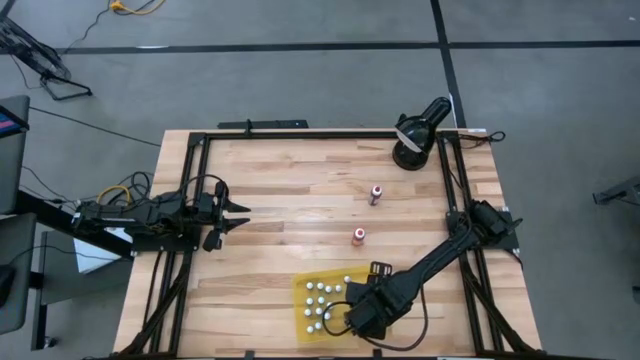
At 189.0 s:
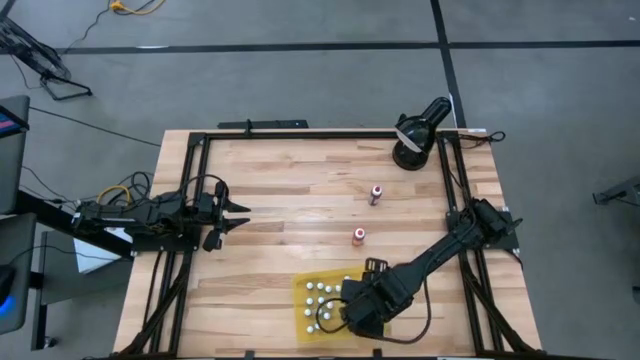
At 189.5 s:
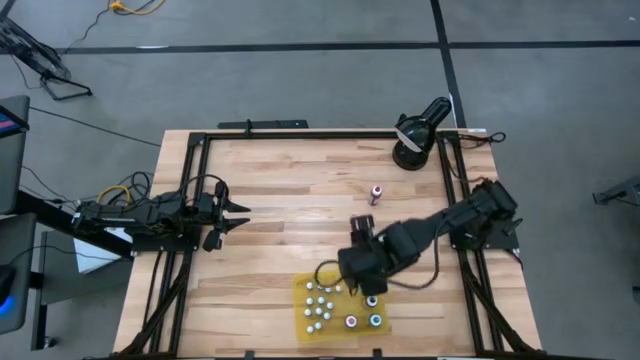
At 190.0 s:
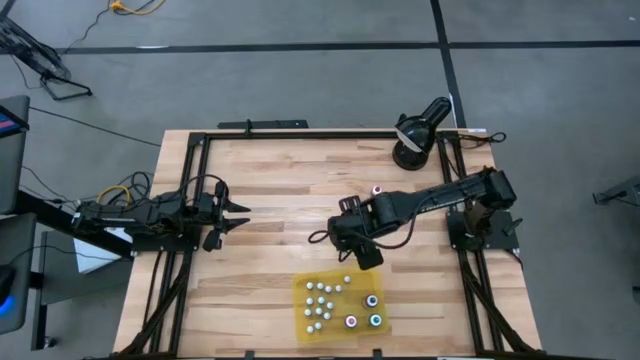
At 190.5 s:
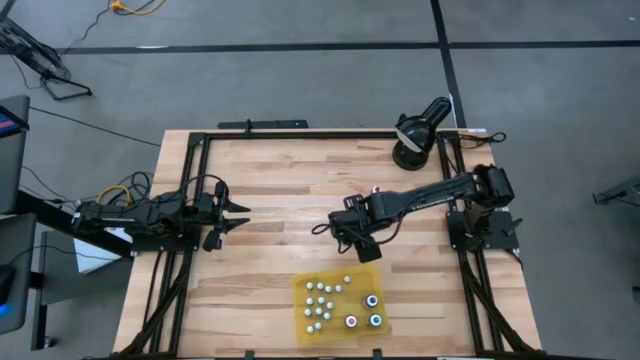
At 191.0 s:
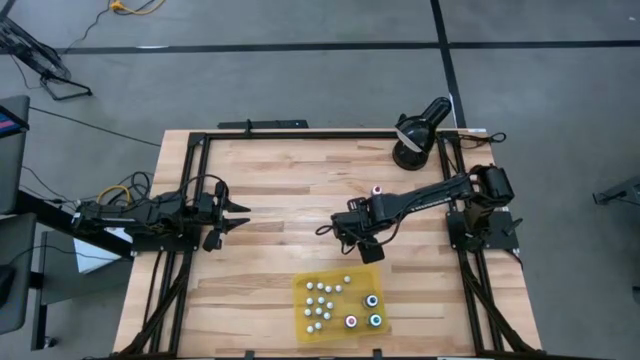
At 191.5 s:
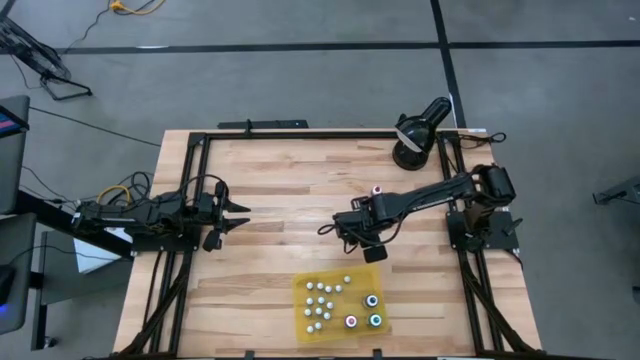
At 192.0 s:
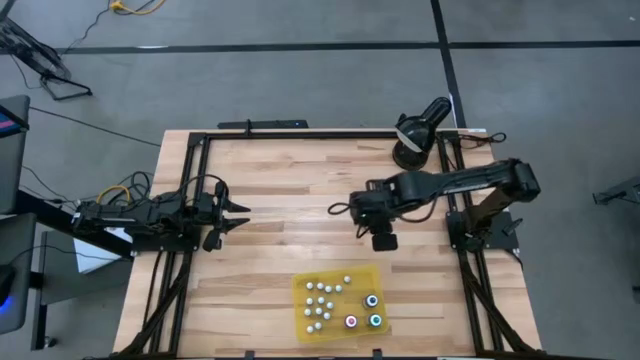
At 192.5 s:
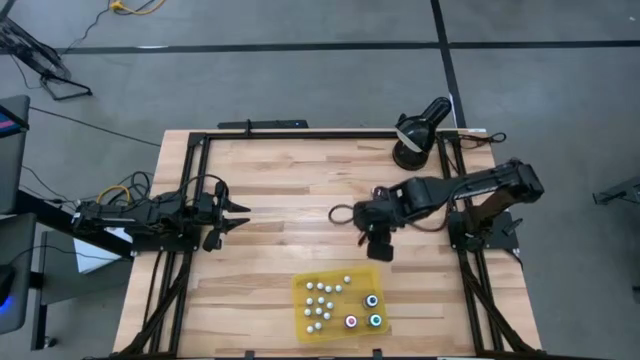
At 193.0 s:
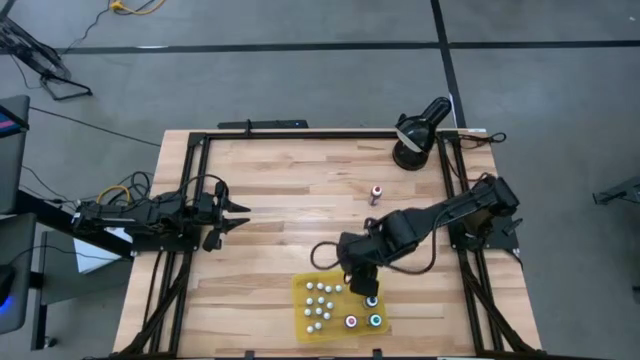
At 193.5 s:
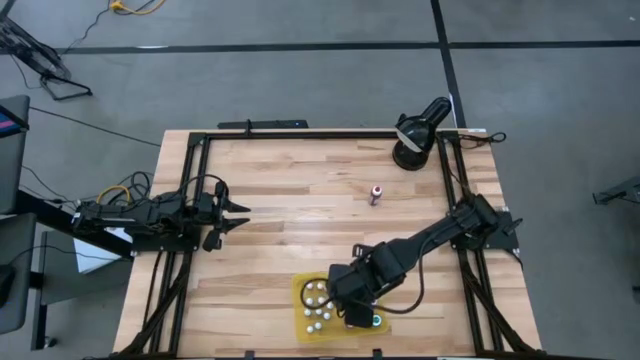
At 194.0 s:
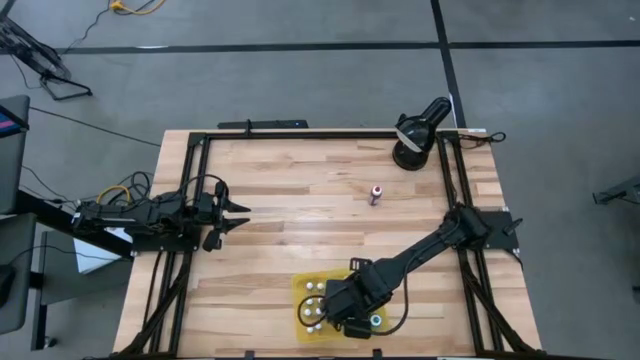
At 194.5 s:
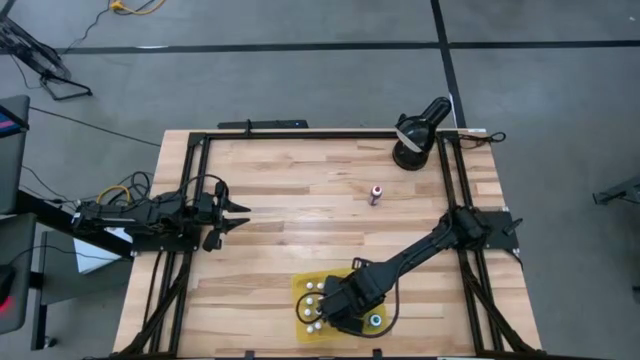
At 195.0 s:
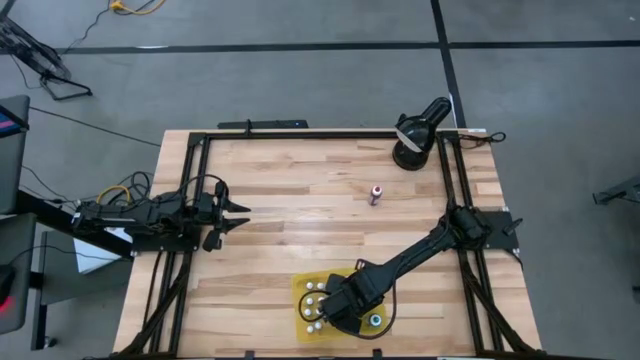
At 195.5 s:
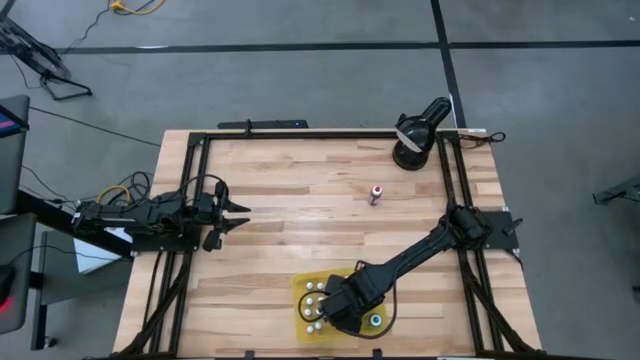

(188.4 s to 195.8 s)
Task: Pick & Place food coloring
Put the big orange food coloring bottle in the yellow bin

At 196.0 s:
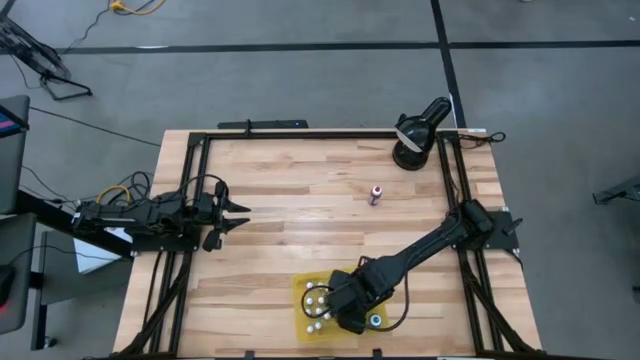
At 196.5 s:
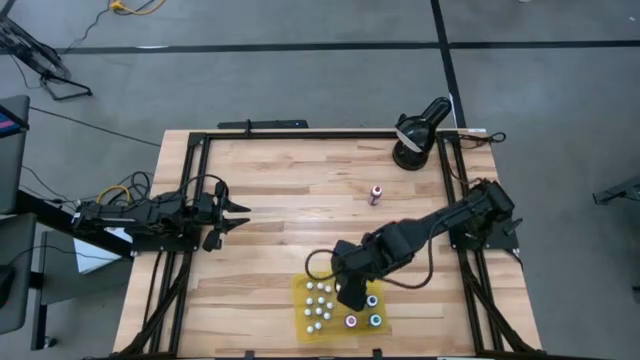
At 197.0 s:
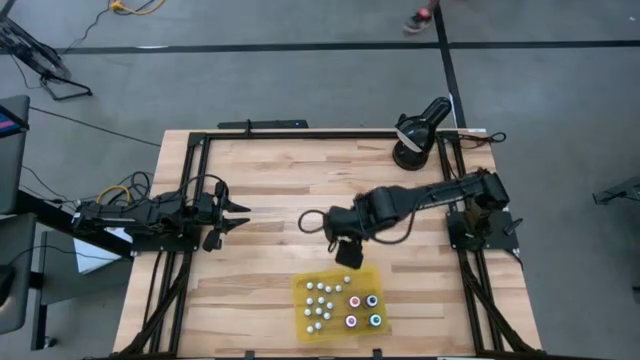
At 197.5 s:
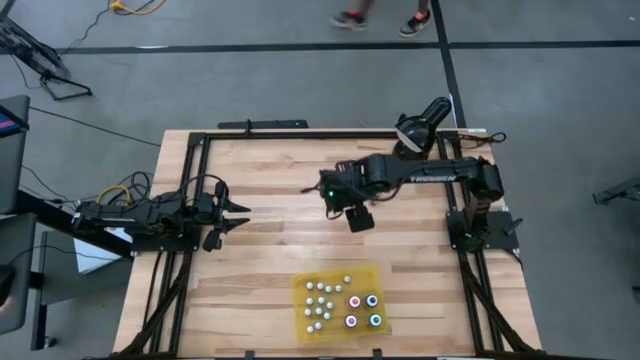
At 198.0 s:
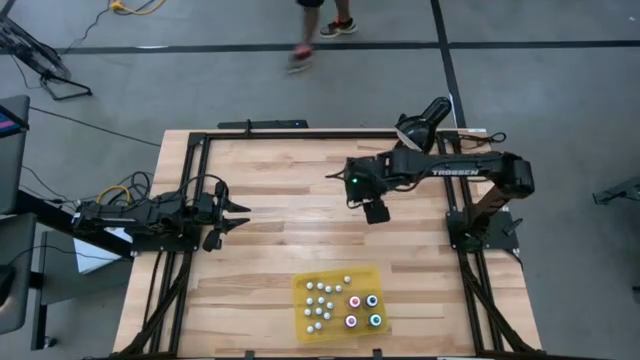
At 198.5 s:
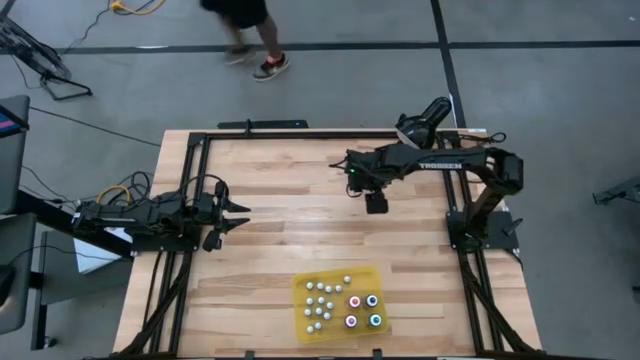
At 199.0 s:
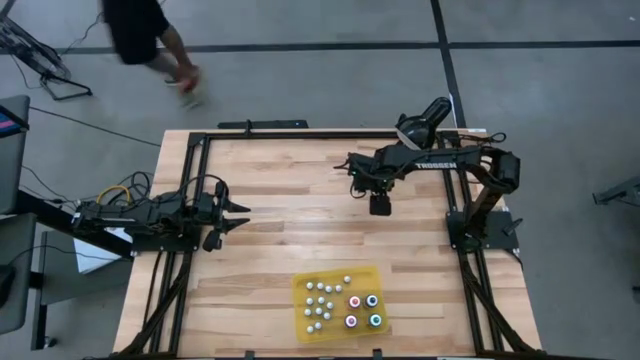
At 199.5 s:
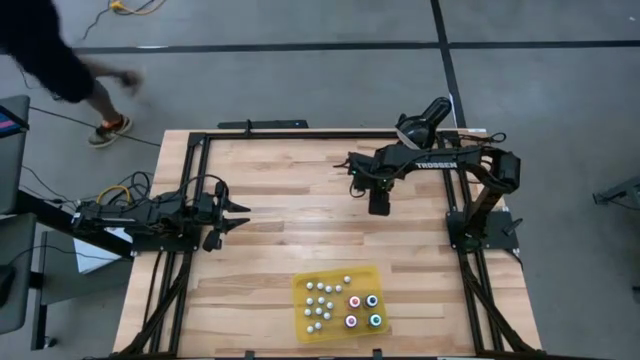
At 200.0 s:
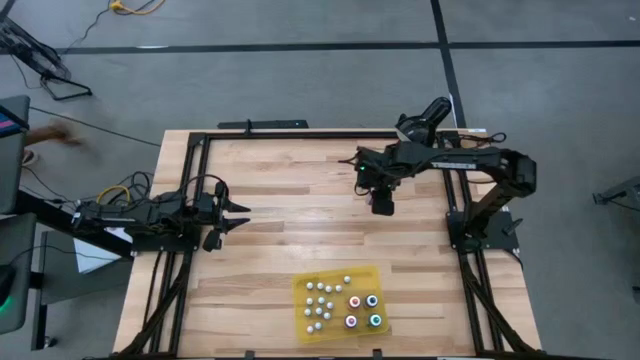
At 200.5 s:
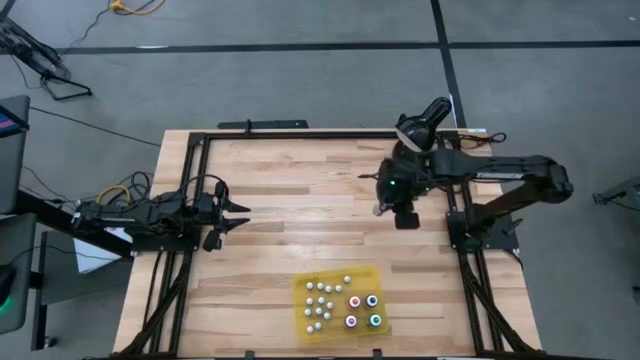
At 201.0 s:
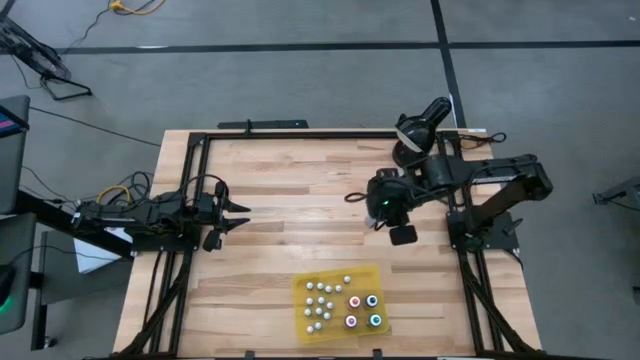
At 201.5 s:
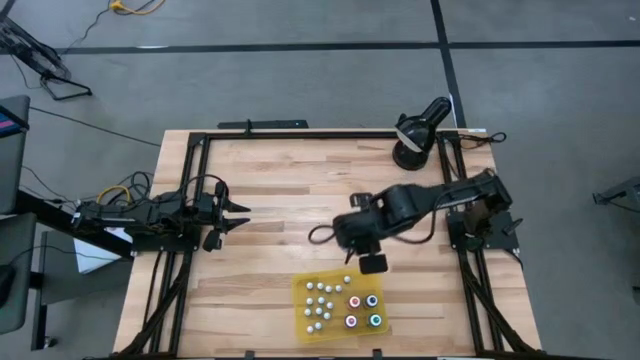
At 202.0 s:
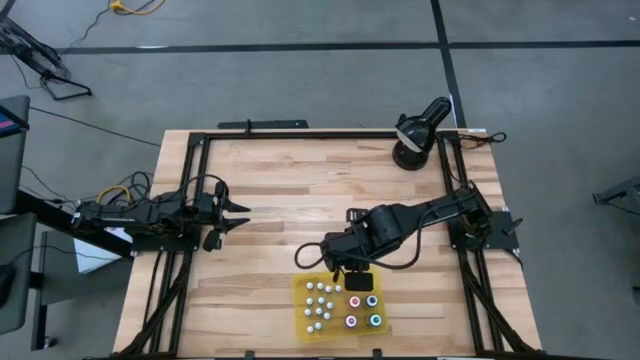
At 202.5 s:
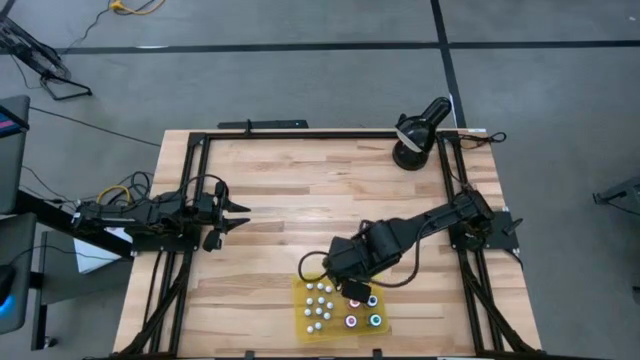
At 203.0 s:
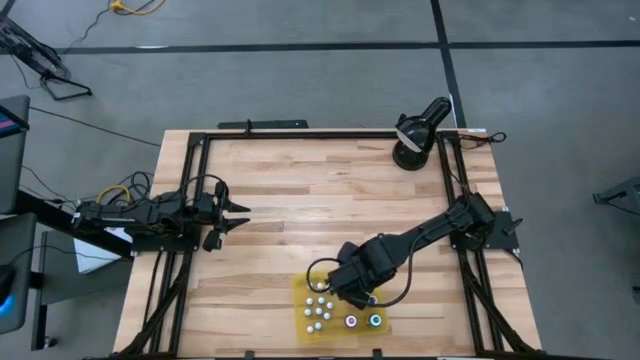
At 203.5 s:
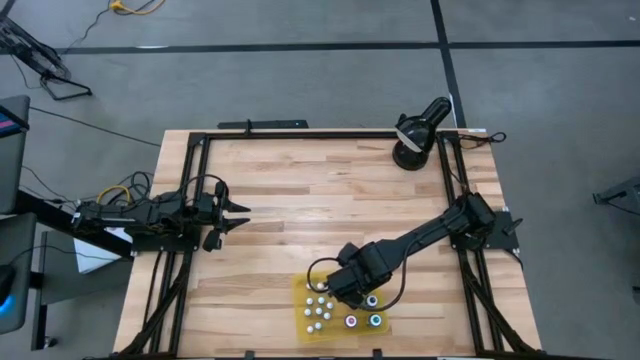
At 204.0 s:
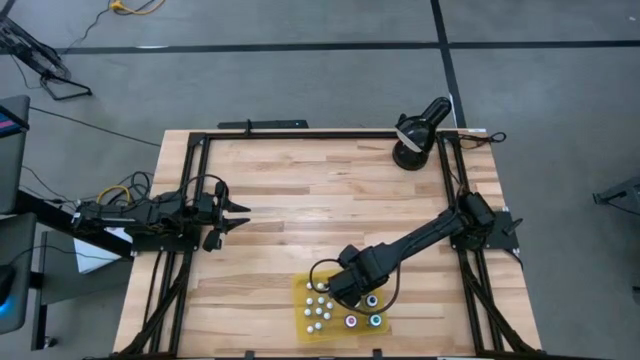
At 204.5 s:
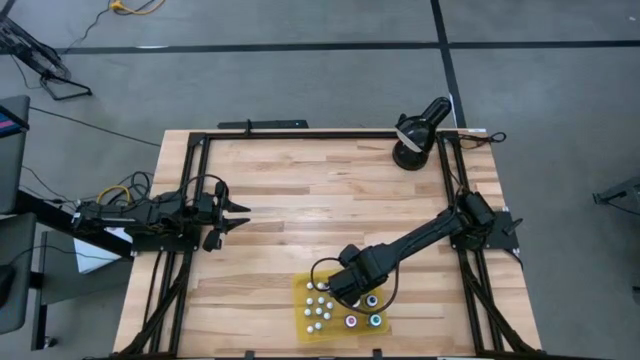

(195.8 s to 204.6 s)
Put the big red food coloring bottle in the yellow bin

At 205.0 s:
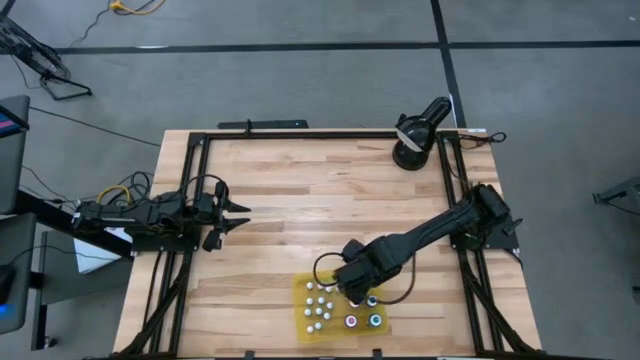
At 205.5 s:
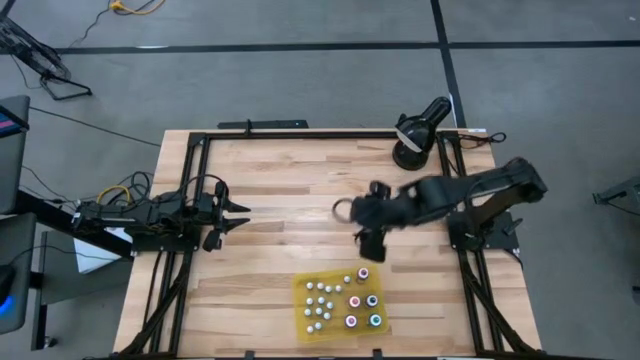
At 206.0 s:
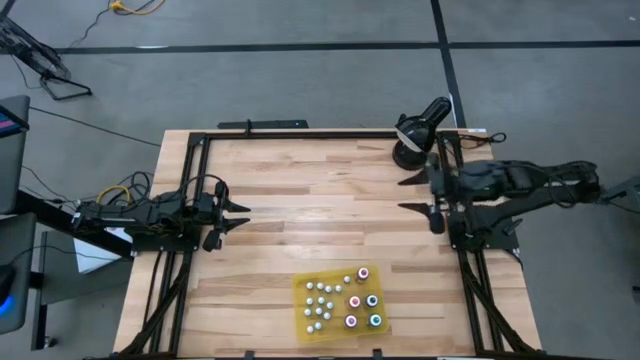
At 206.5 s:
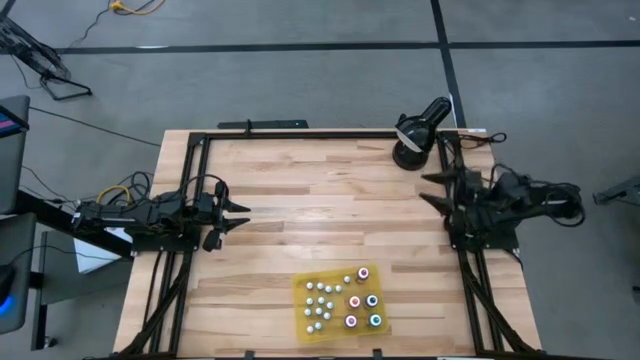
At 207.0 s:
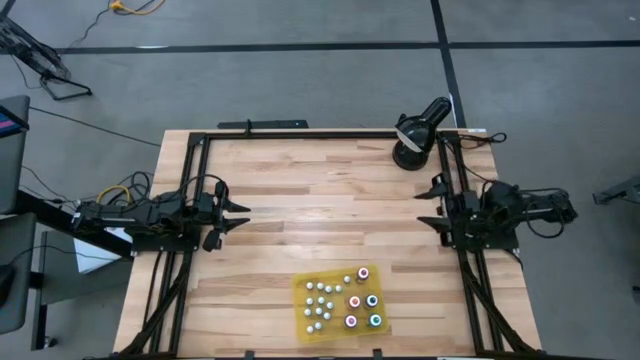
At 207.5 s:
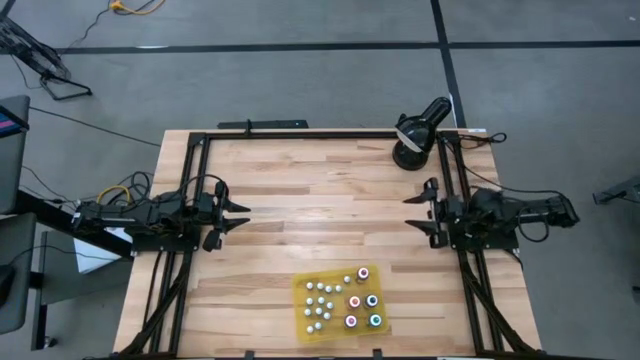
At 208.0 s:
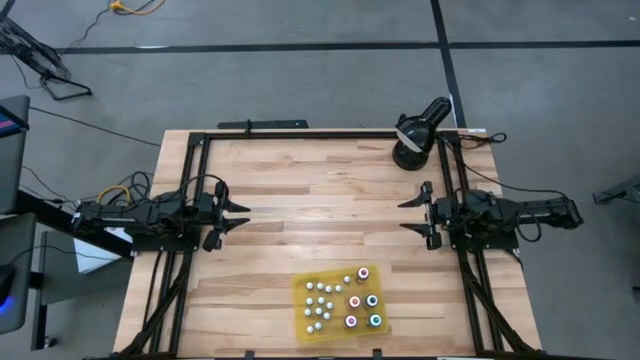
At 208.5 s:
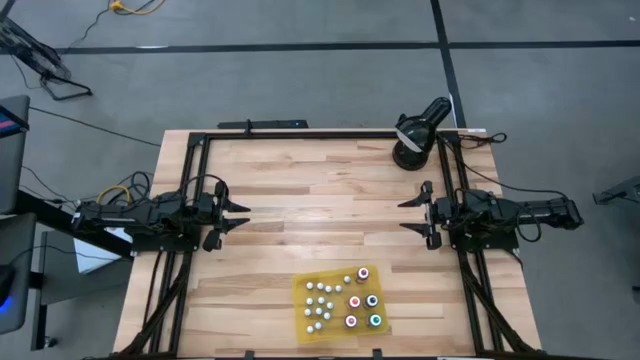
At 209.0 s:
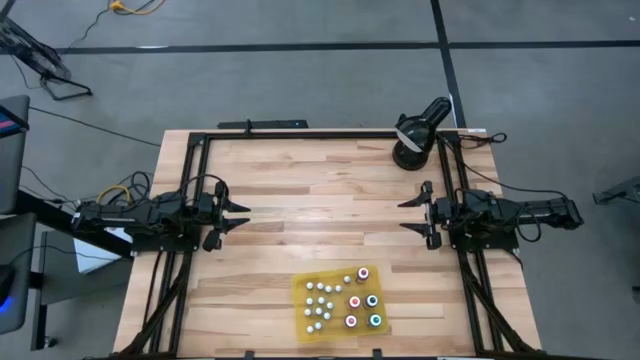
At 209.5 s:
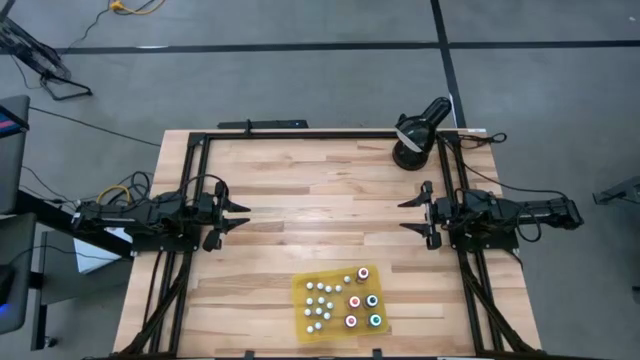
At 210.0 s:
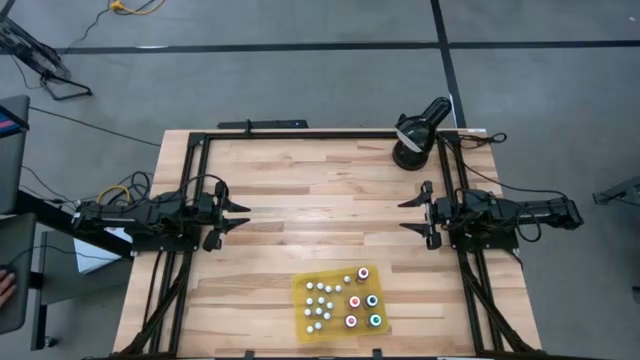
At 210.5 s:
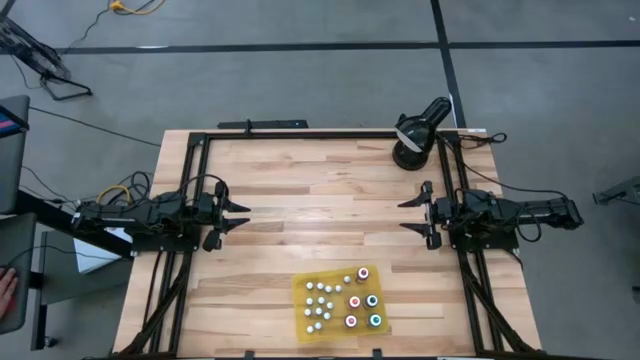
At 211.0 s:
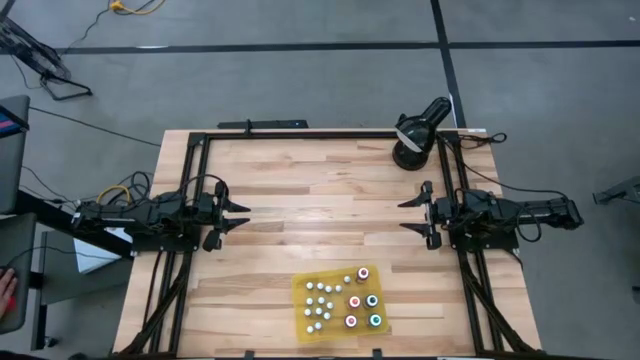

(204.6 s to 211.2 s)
Return to Home Position
